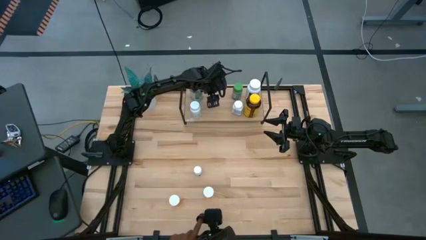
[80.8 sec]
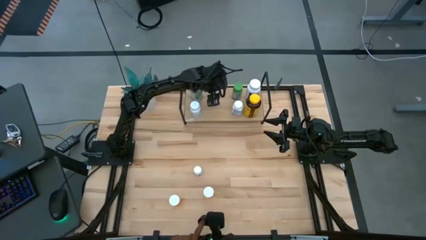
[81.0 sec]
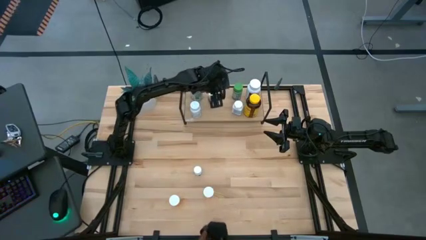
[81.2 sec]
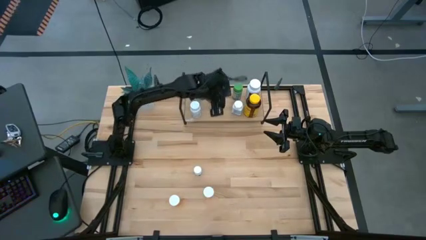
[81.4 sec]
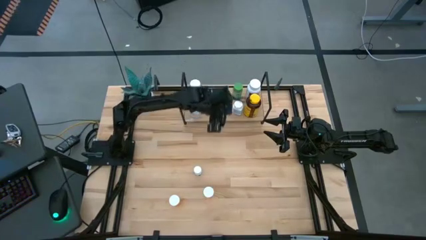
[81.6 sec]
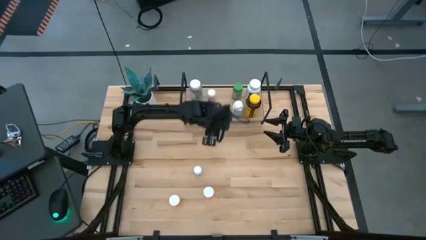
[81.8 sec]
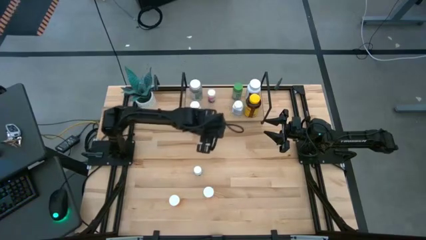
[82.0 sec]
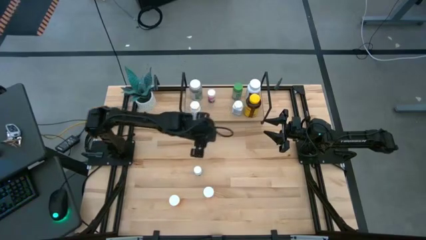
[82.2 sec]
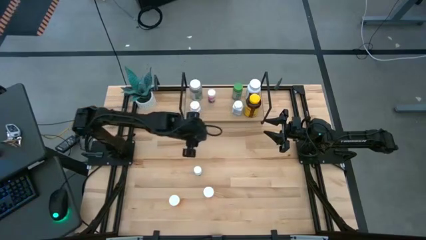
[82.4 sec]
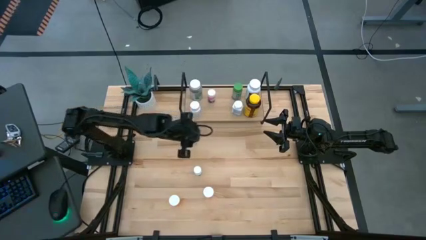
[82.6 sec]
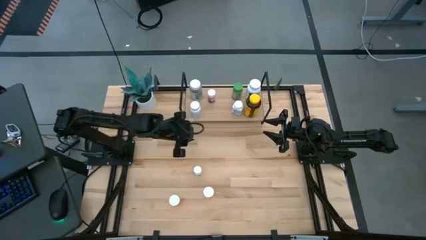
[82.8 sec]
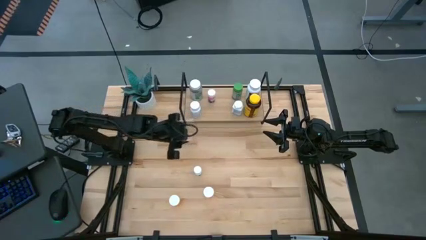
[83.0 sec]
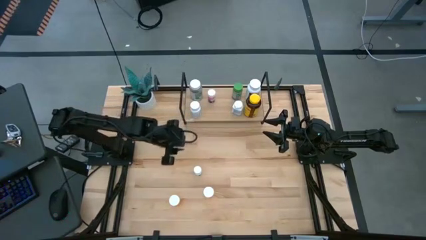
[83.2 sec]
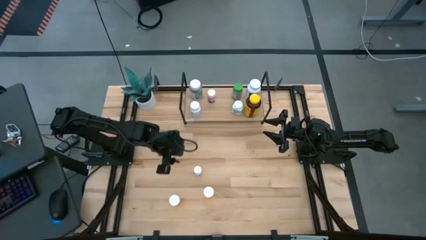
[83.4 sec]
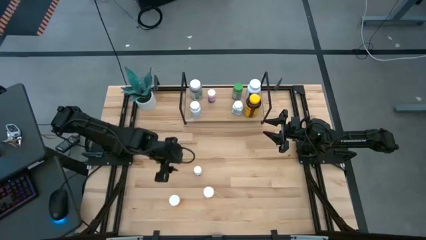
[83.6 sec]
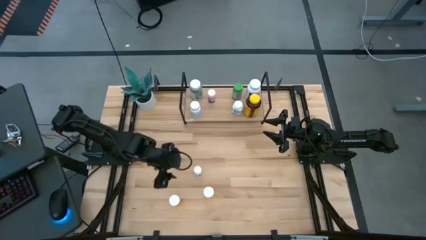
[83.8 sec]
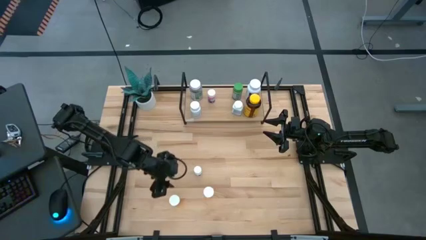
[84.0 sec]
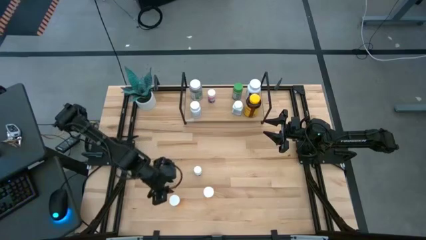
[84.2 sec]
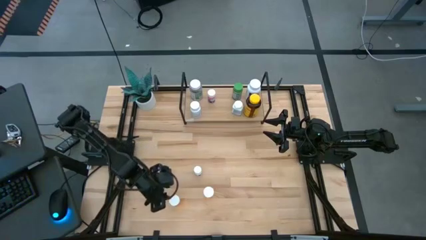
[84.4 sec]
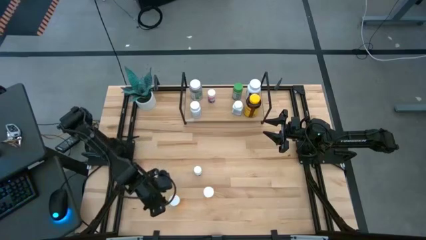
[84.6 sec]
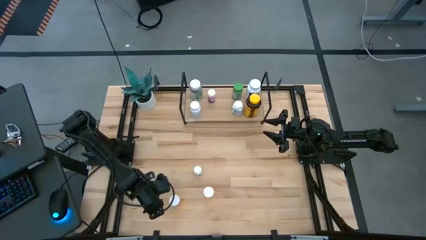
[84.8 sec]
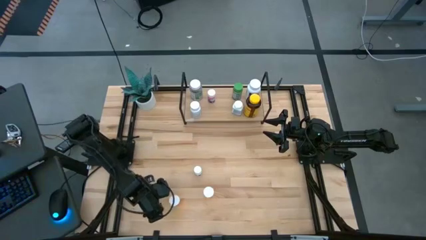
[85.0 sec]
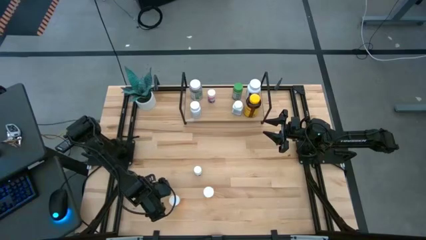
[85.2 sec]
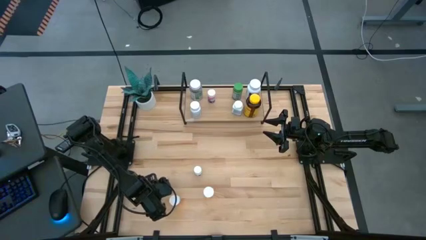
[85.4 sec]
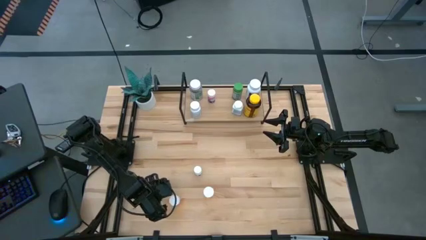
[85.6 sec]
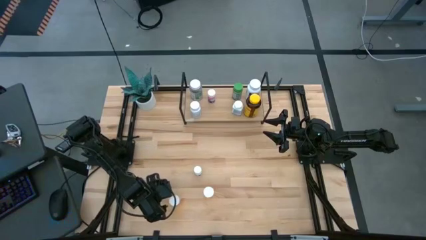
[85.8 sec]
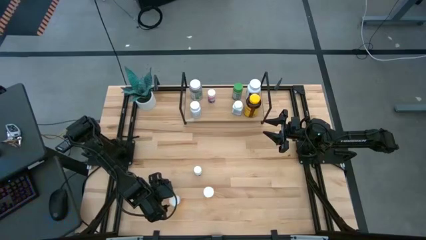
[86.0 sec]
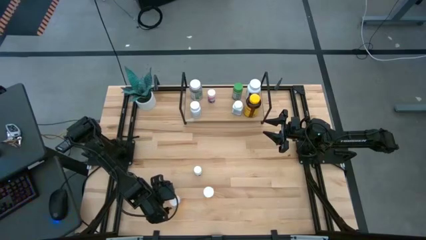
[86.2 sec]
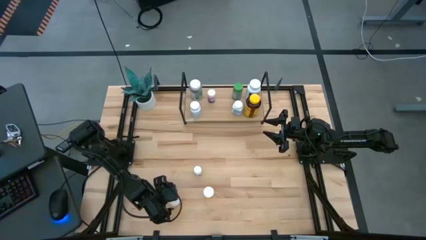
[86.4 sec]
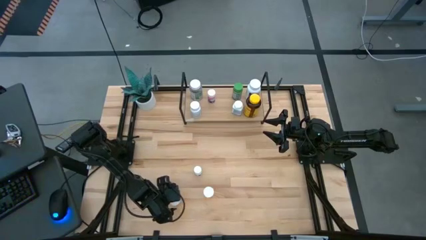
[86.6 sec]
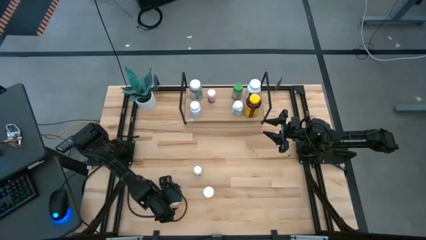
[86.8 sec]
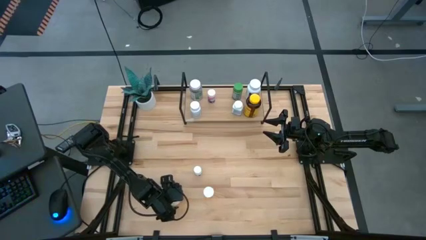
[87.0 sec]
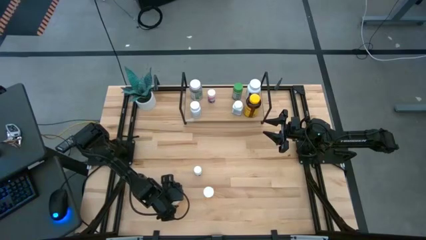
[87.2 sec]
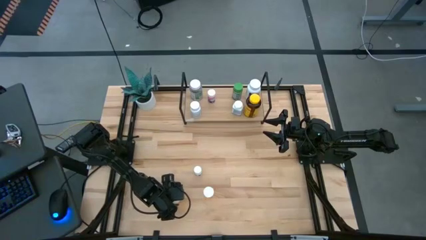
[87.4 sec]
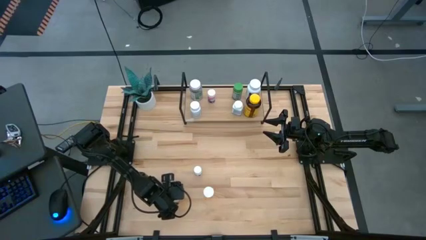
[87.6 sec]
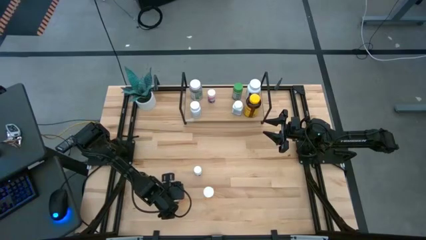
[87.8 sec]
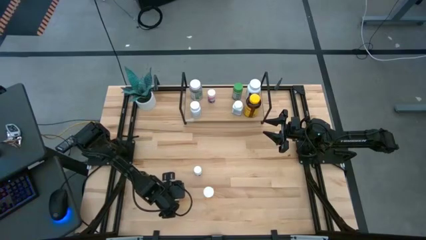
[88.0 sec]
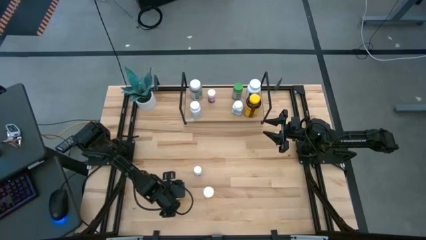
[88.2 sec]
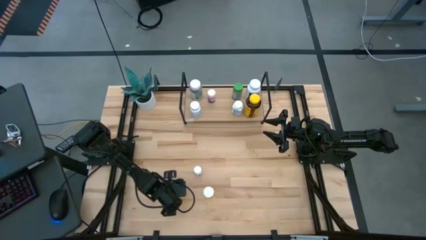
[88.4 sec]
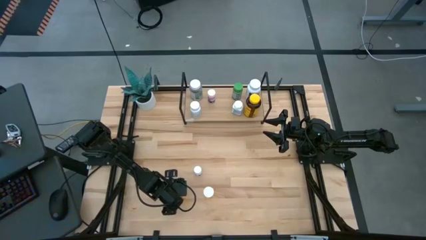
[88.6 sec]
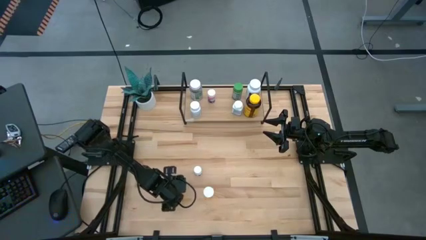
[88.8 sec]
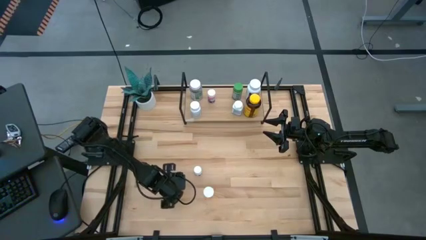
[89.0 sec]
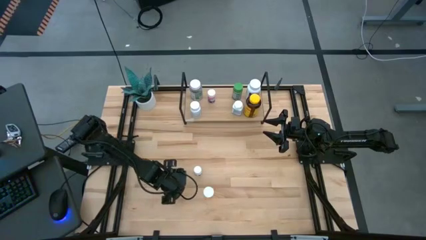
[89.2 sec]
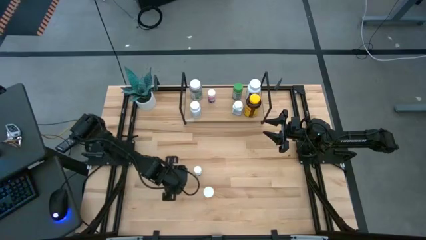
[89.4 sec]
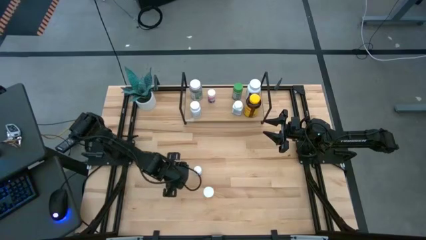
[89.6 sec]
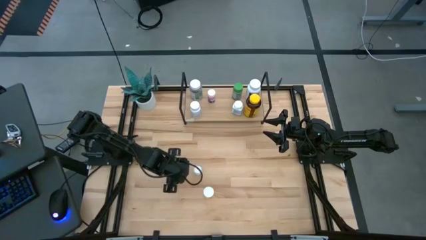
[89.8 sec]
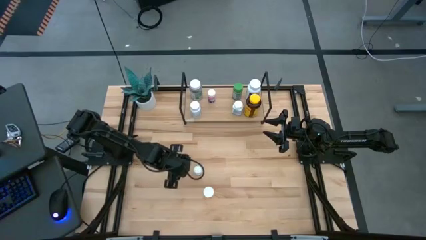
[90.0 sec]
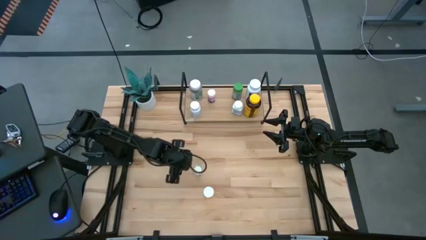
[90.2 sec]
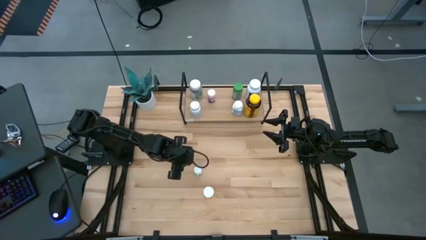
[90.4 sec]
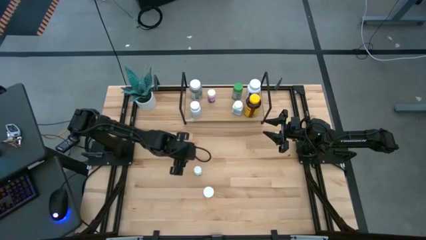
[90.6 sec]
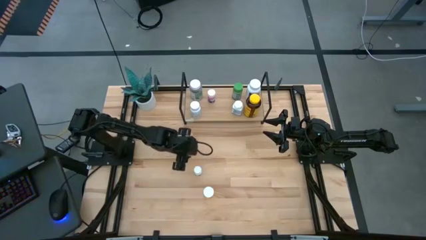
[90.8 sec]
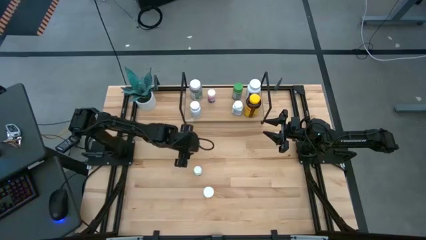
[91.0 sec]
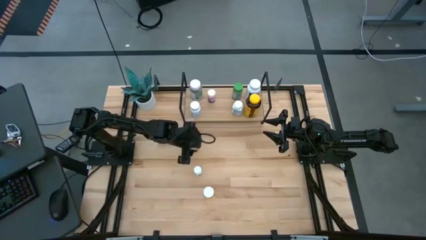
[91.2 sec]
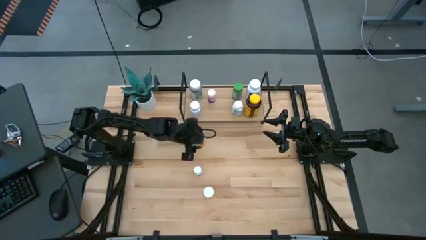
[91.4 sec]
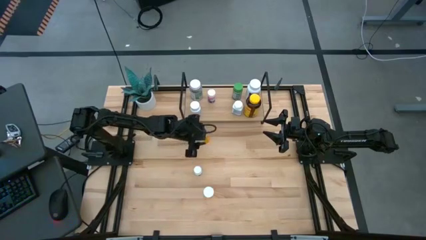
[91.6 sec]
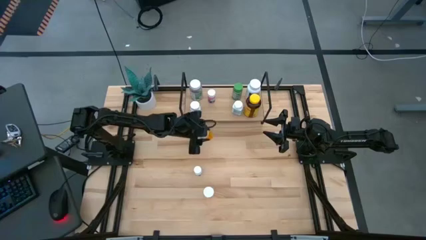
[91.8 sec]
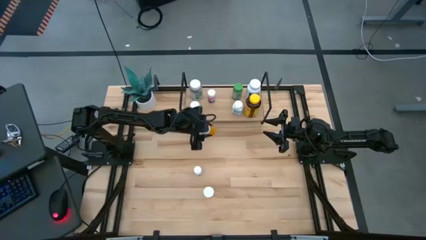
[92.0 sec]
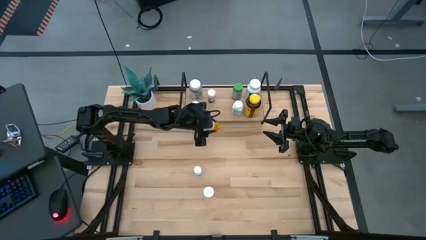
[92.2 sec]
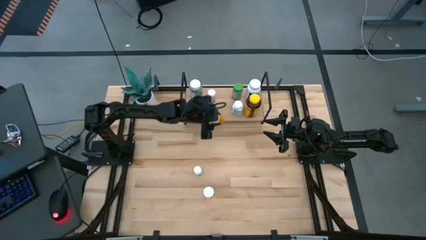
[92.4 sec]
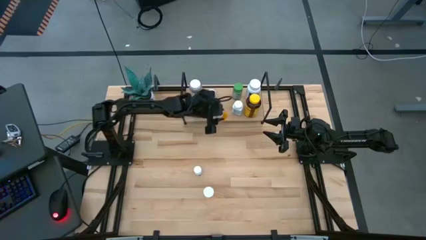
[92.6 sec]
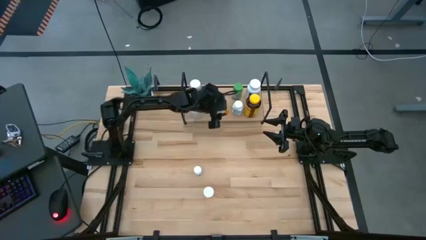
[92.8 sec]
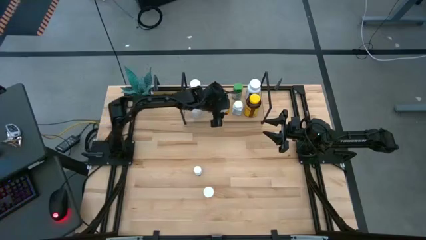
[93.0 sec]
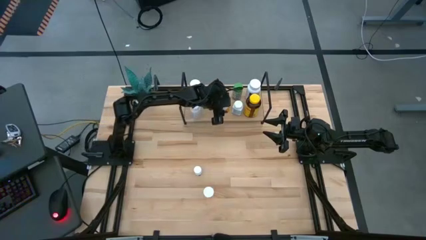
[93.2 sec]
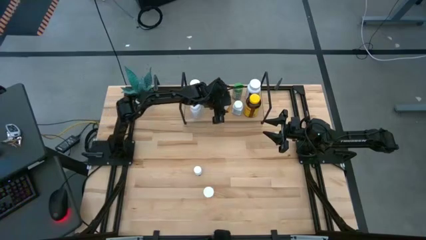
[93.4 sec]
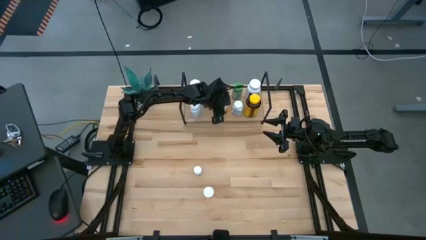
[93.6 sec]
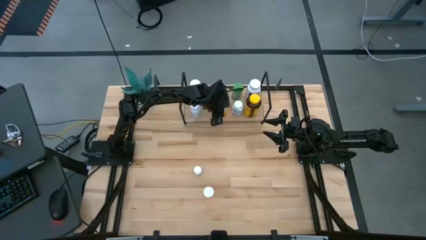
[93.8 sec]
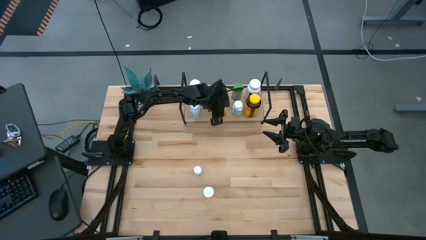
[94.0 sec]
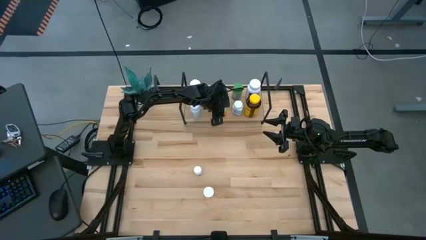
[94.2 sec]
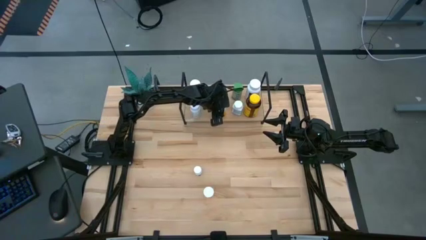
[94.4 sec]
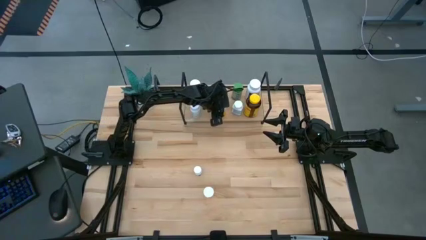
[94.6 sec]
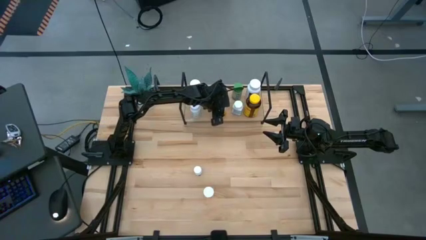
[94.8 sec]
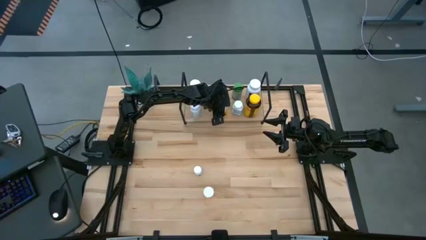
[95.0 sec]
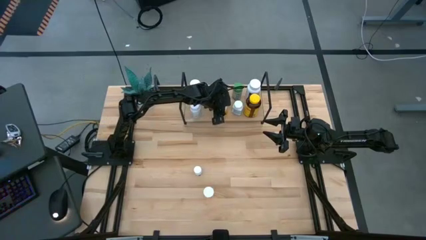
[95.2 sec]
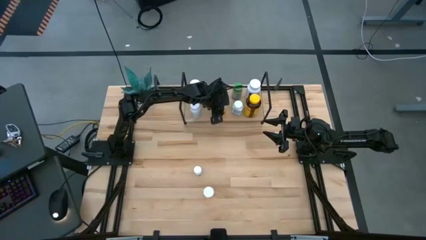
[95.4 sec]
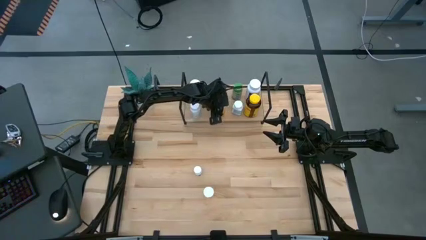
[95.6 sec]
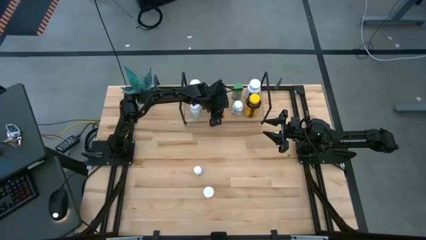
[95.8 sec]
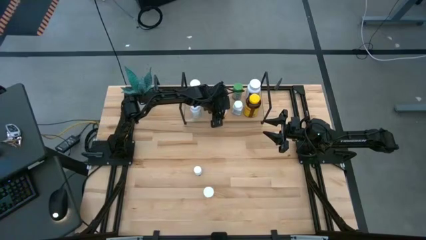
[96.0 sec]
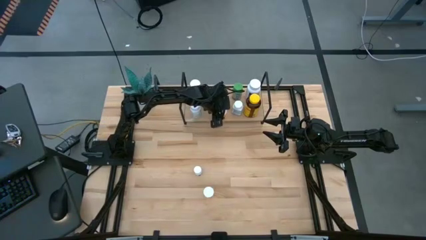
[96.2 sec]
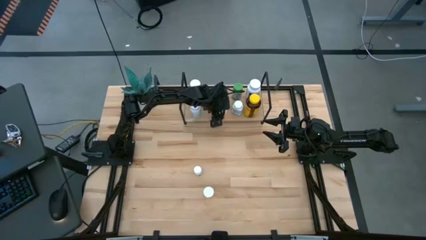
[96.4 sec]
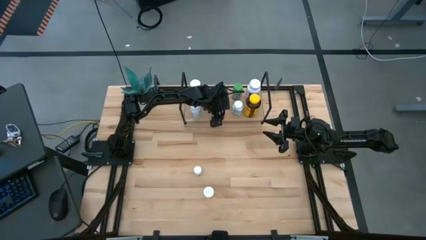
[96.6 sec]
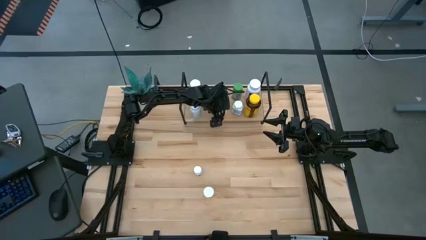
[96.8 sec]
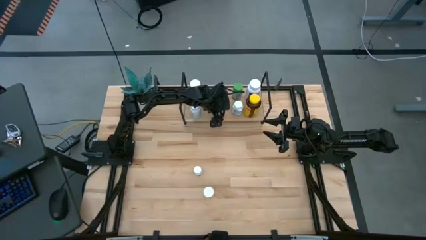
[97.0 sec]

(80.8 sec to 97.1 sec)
Task: Pick and place medicine bottles onto shelf by color
Put the left orange medicine bottle on the shelf
